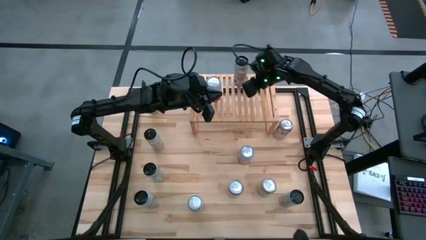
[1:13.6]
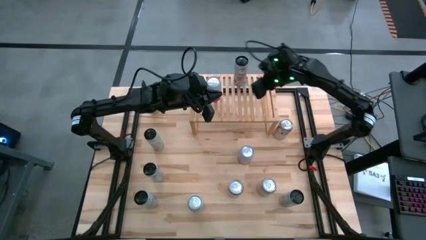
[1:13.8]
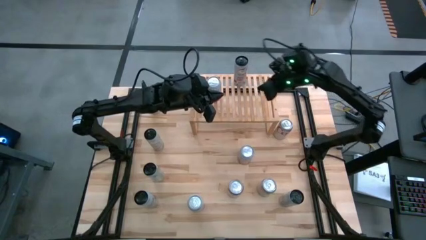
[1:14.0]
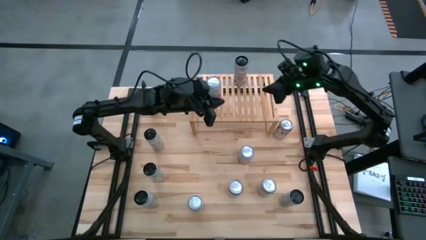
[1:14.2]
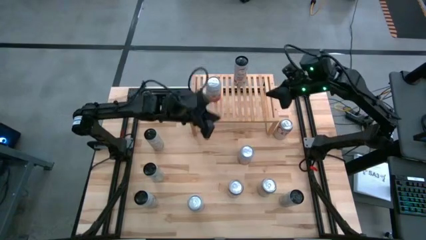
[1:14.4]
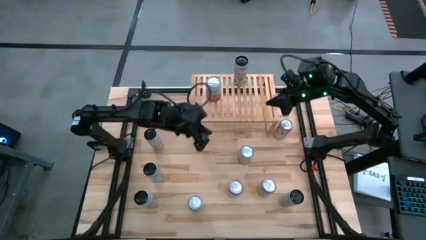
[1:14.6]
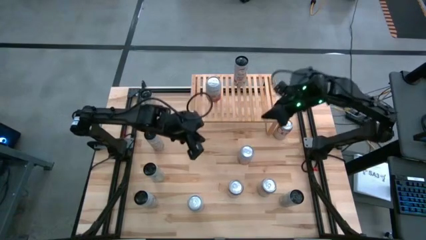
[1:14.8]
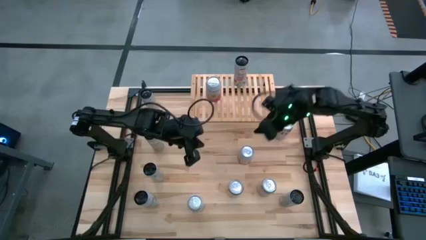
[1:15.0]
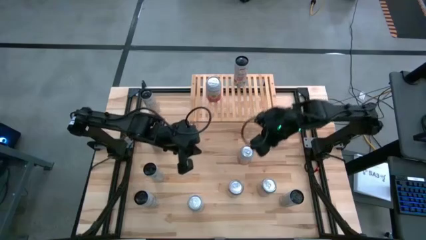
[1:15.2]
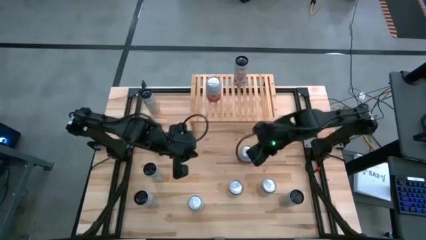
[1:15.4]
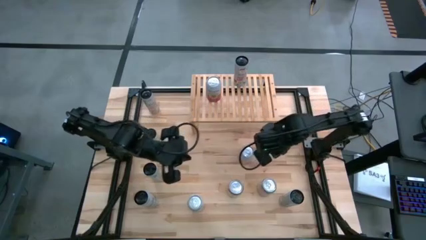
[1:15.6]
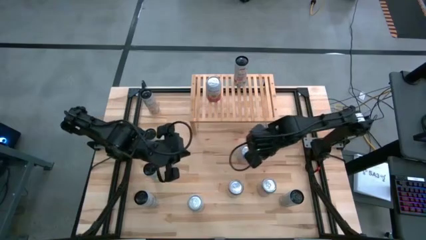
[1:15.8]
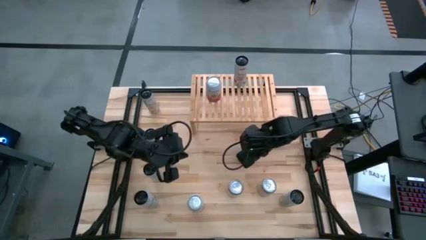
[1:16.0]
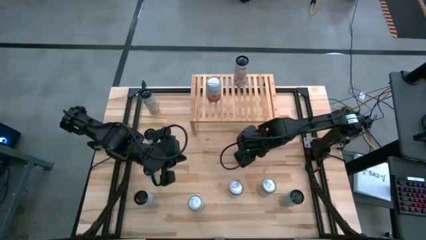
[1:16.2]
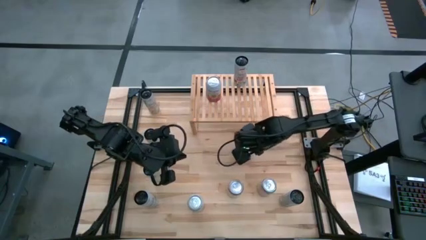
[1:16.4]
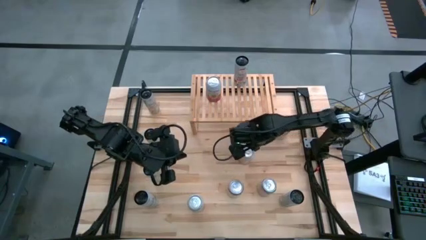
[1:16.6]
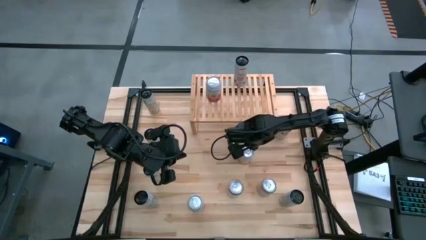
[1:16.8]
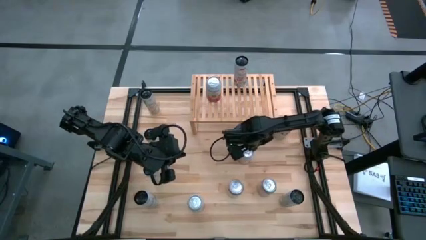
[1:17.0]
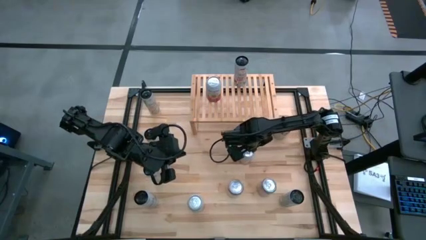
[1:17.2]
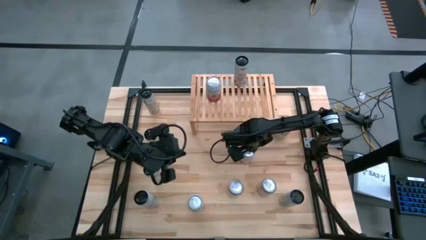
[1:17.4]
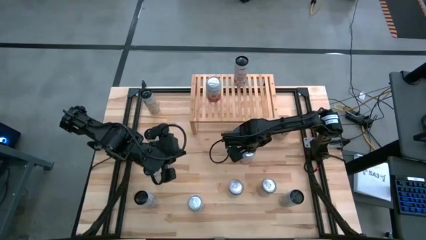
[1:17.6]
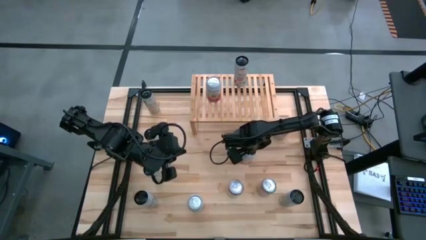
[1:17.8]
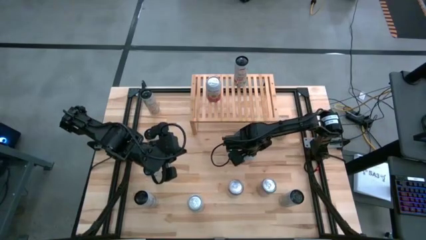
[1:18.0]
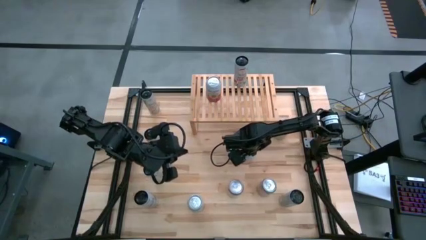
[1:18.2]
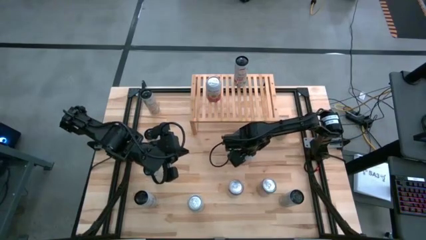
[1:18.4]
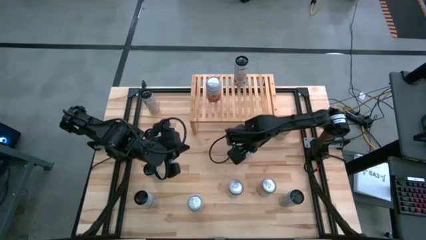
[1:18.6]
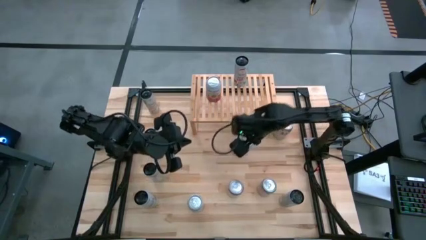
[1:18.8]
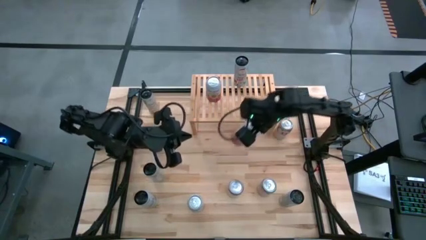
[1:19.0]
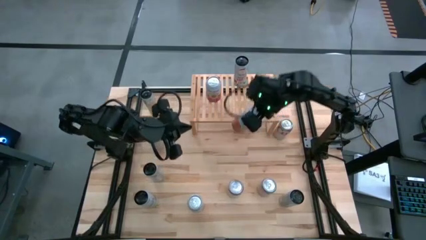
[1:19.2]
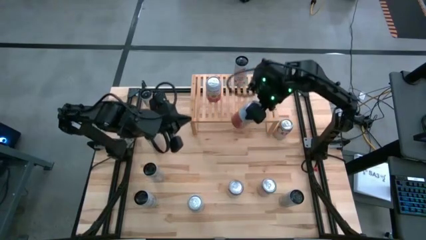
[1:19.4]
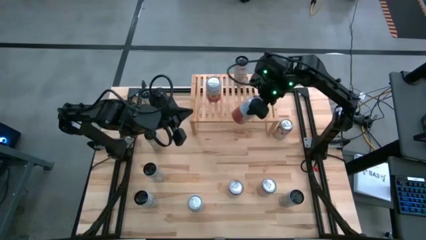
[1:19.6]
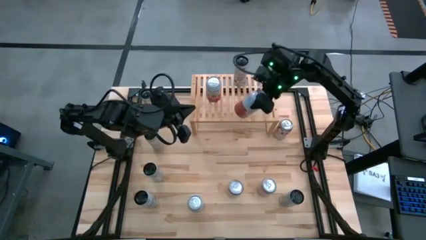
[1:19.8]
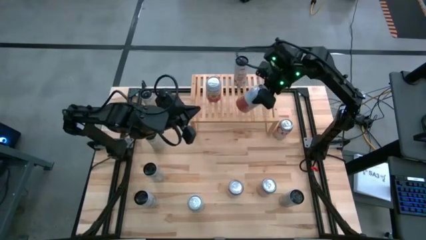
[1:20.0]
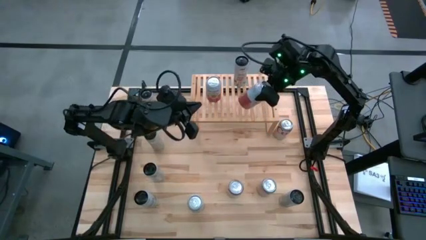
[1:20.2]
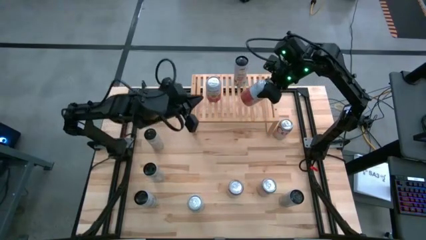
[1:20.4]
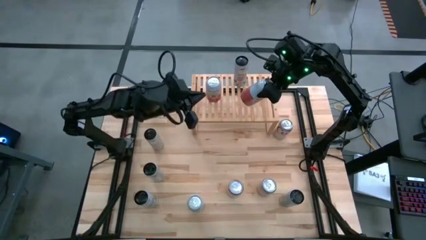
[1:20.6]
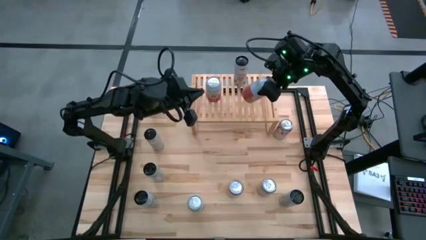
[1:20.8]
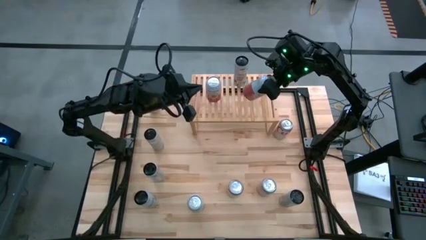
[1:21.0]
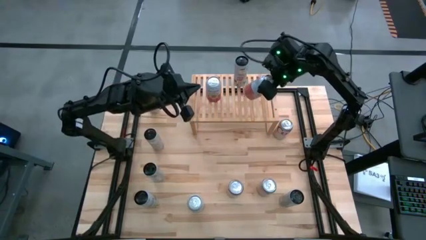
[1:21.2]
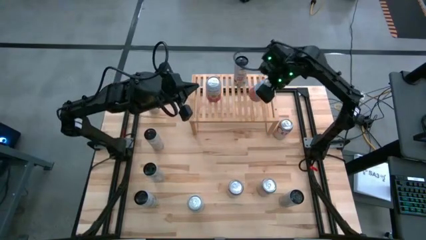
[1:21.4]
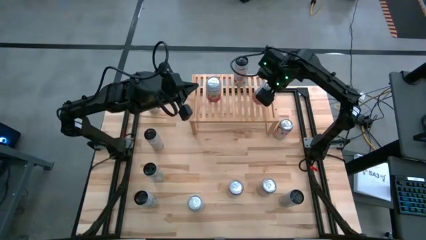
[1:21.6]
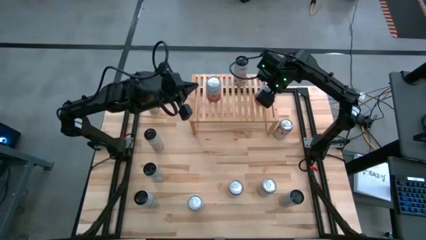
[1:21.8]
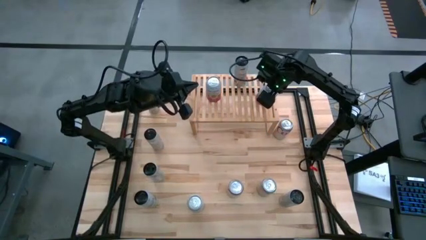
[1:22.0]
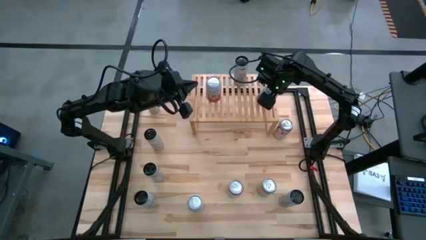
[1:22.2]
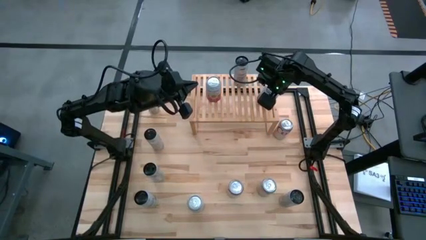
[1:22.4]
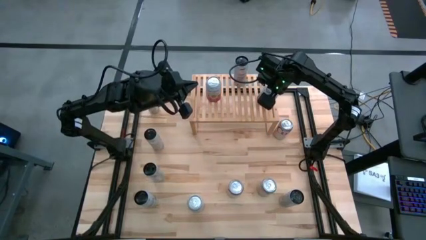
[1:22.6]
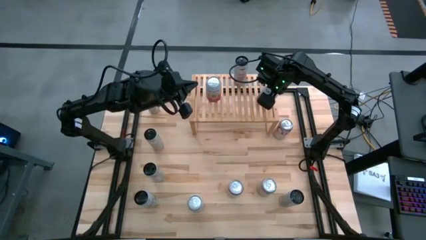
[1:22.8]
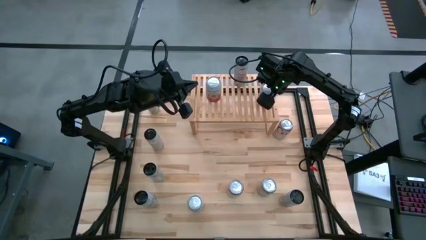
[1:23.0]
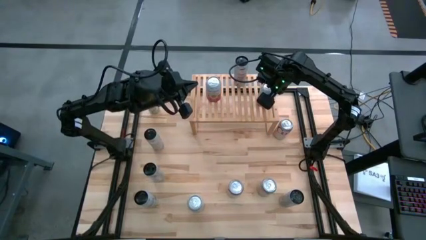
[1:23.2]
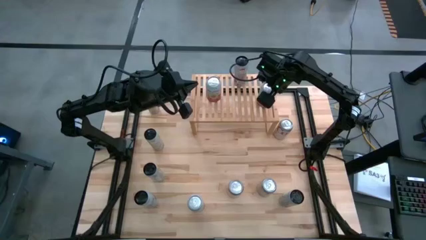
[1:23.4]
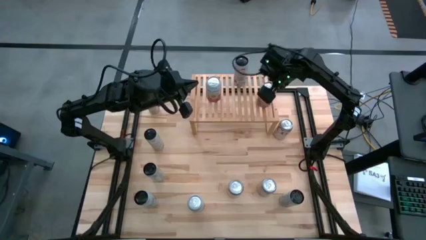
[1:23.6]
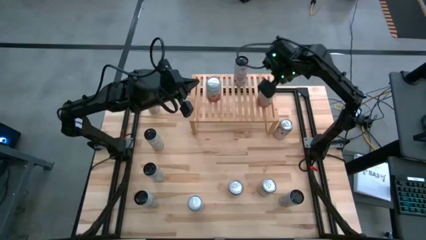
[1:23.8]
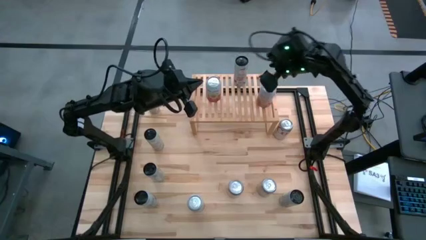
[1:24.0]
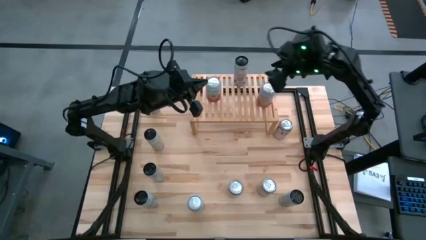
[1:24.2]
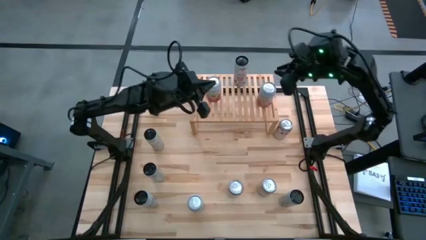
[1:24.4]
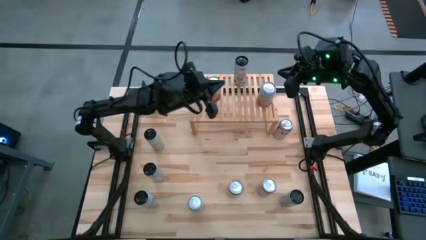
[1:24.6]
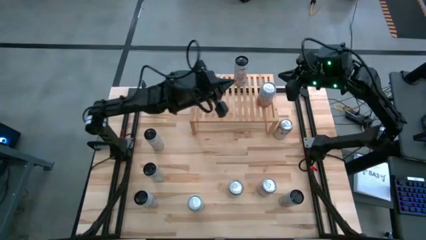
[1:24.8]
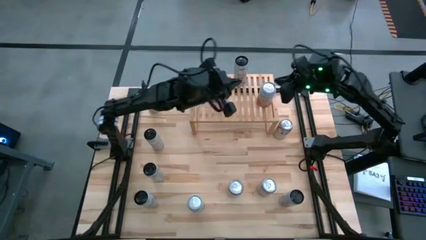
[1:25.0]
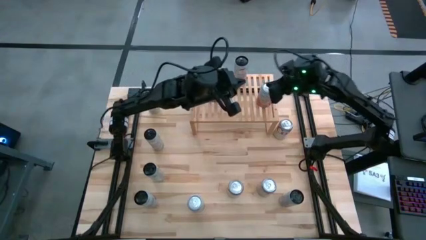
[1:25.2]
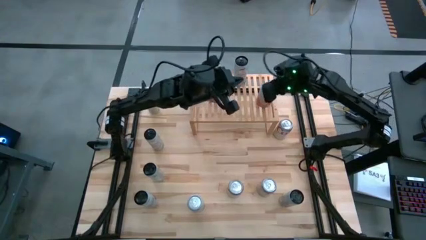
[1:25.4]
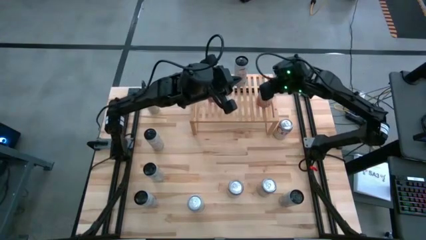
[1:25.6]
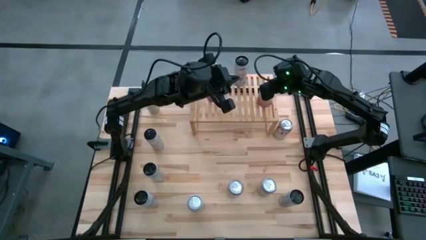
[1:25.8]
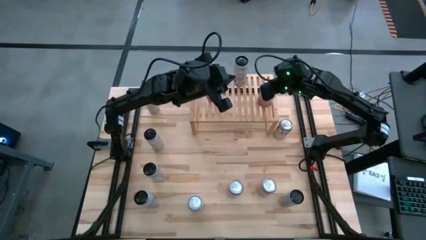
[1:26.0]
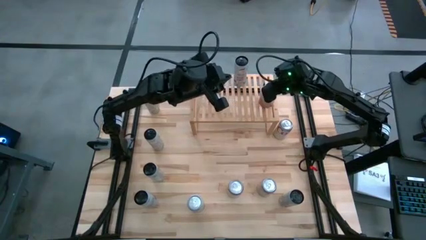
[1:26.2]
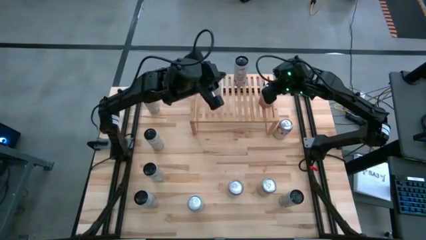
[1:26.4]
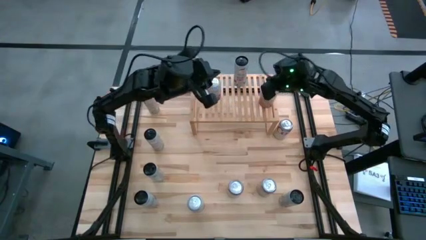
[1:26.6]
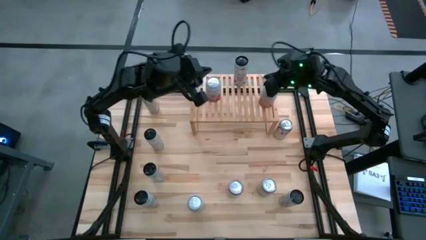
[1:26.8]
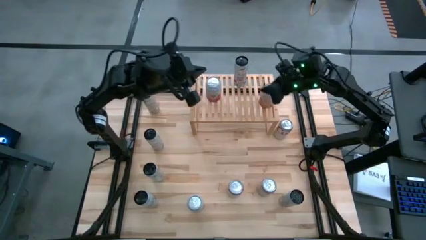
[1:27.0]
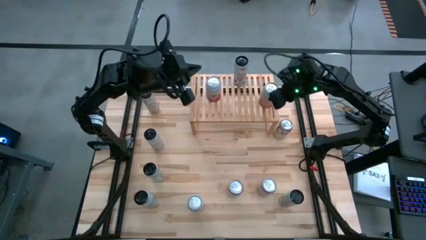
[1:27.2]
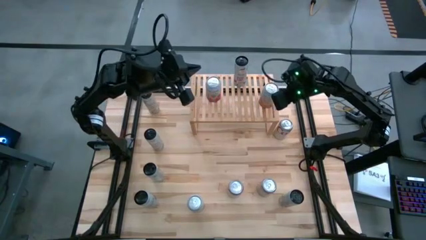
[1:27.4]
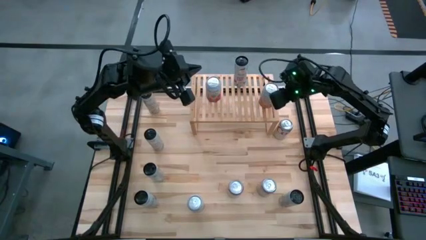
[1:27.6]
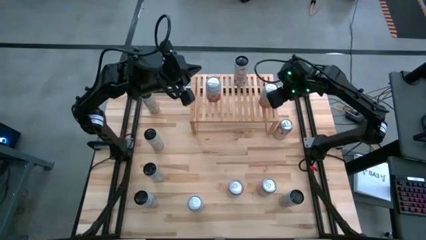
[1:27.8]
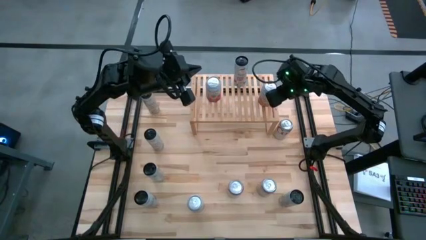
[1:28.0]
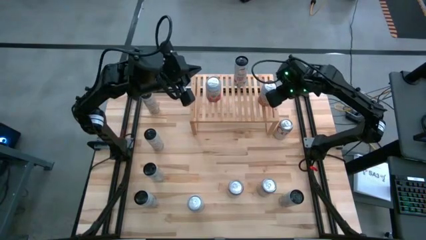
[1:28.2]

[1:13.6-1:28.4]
Task: Place canned beverage on shelf
Put the orange and white soda can on the shelf

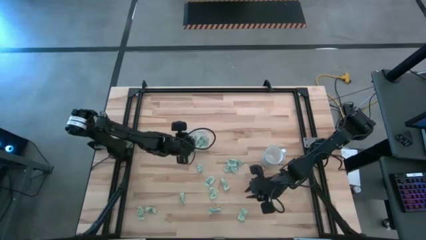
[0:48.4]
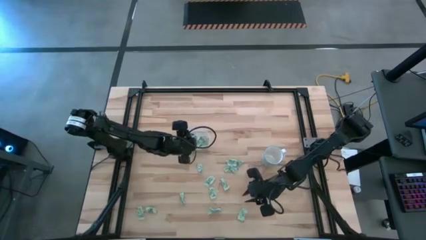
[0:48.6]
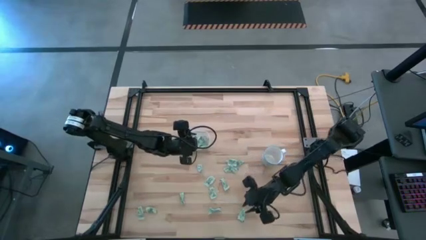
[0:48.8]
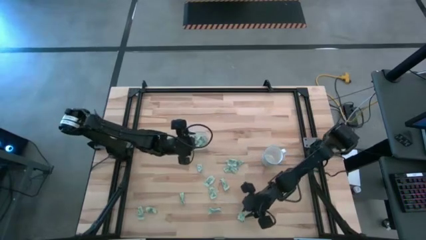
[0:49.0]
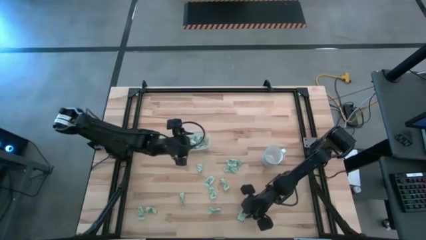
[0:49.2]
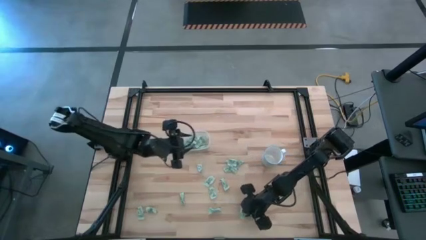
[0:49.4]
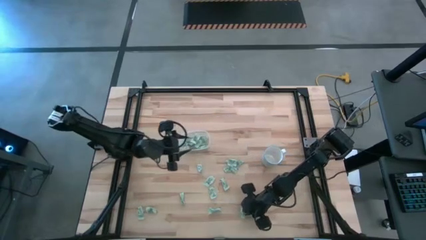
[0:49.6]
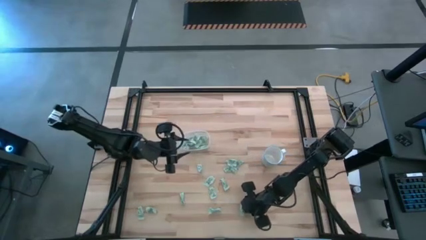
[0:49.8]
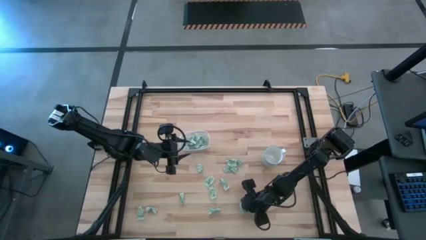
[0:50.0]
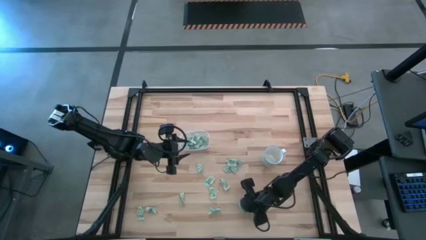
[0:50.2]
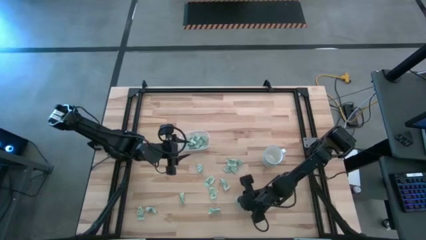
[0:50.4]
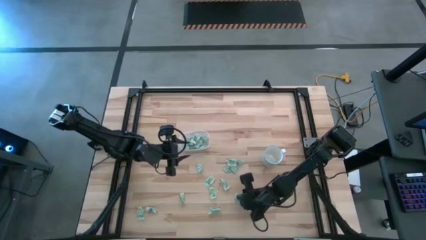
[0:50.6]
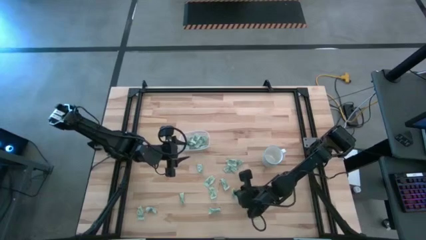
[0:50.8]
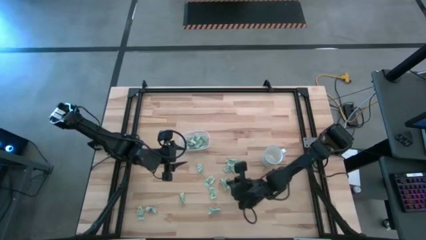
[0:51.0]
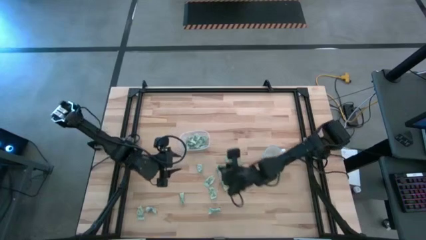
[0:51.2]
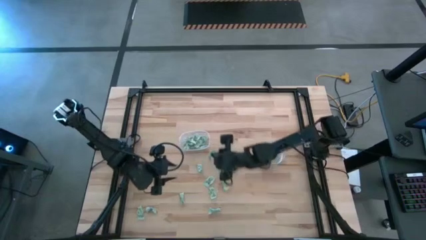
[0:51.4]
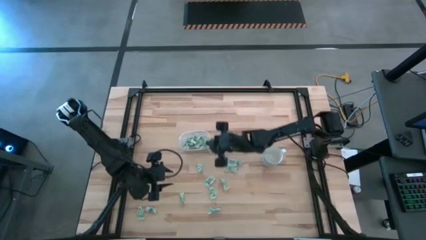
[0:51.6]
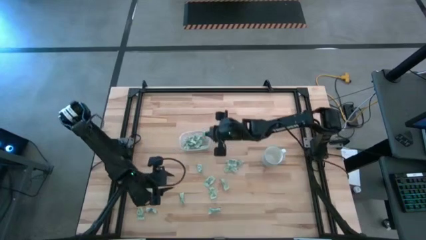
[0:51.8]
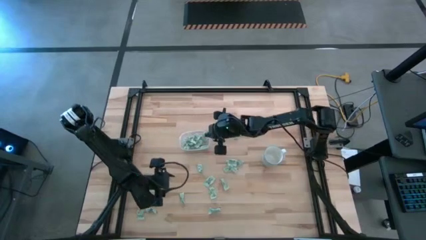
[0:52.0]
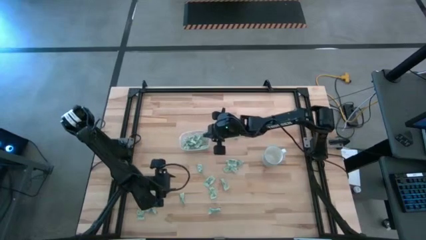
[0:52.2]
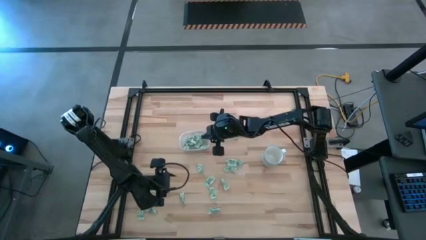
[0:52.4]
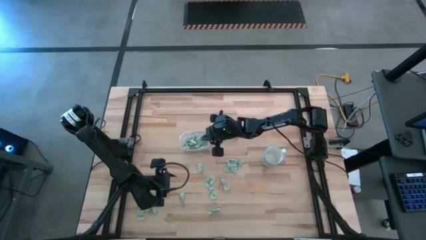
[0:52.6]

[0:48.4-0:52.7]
Task: Pick and place Stevia / Truvia into bins
Put the stevia packet into the transparent bin
